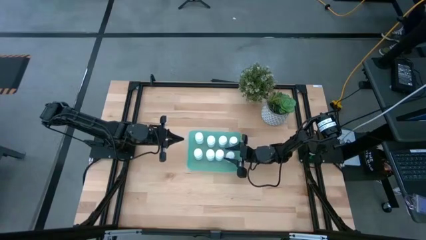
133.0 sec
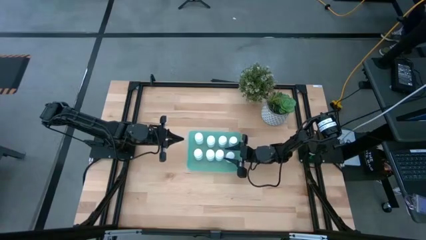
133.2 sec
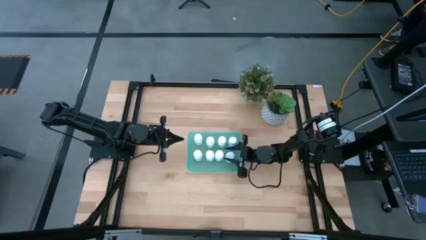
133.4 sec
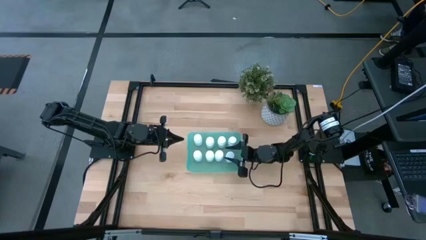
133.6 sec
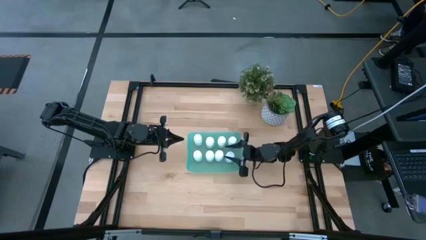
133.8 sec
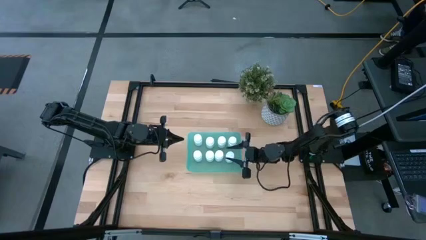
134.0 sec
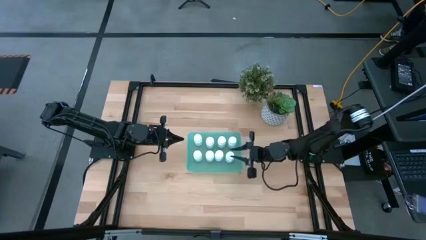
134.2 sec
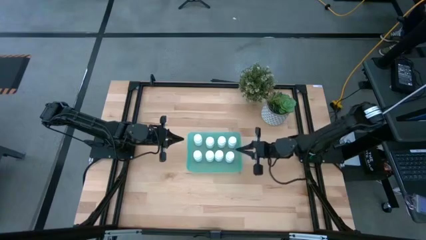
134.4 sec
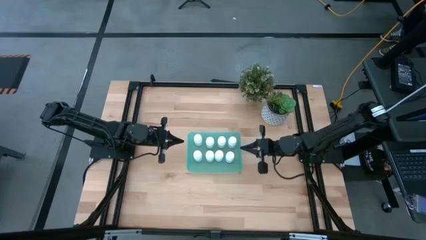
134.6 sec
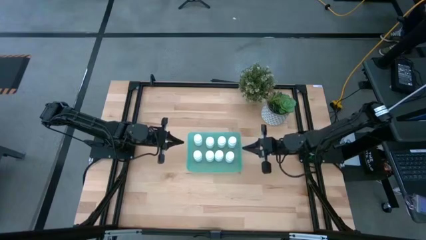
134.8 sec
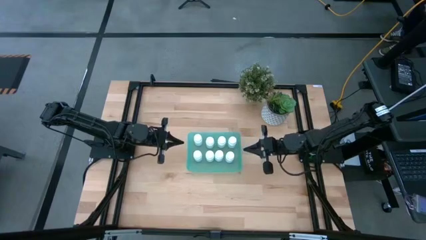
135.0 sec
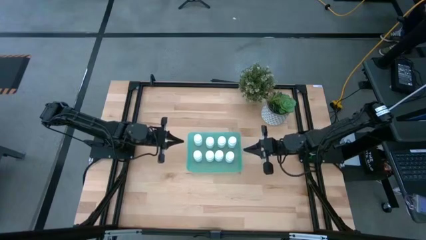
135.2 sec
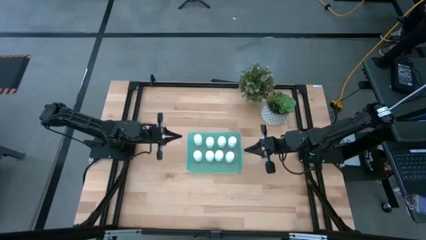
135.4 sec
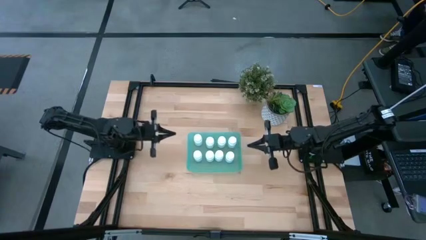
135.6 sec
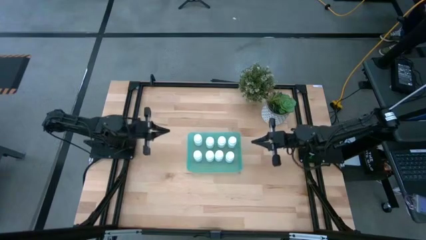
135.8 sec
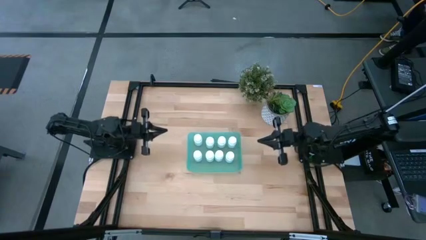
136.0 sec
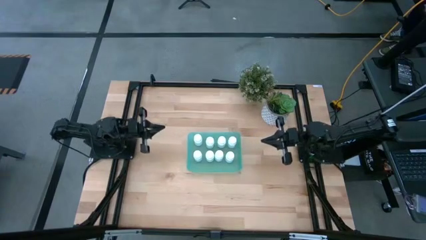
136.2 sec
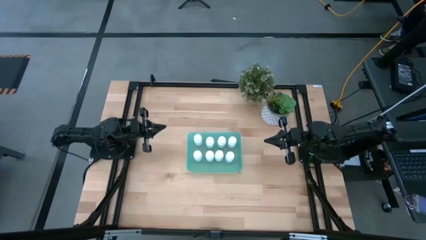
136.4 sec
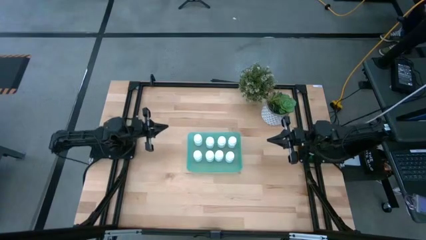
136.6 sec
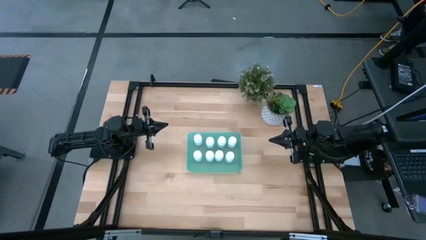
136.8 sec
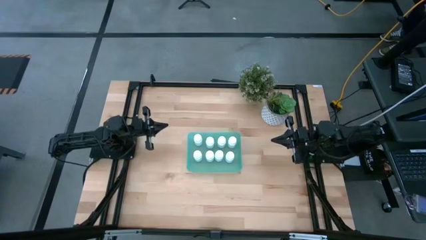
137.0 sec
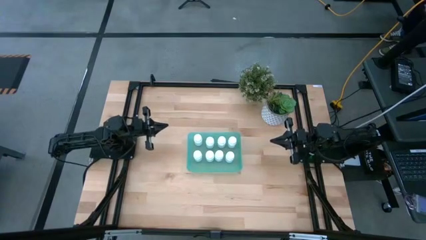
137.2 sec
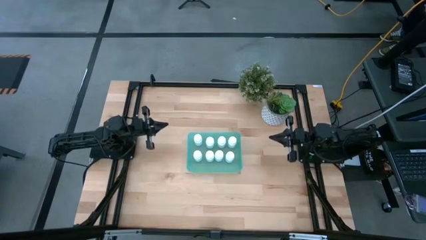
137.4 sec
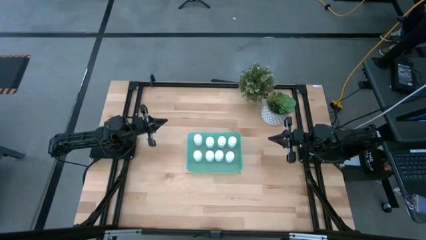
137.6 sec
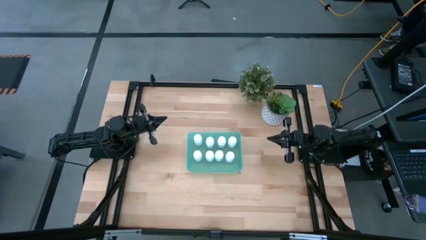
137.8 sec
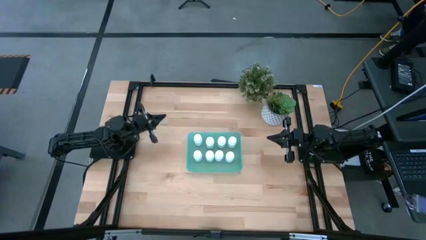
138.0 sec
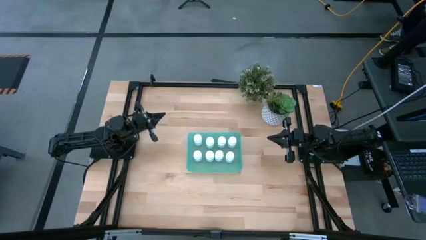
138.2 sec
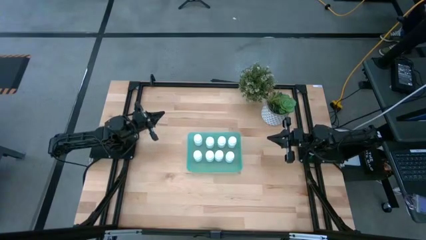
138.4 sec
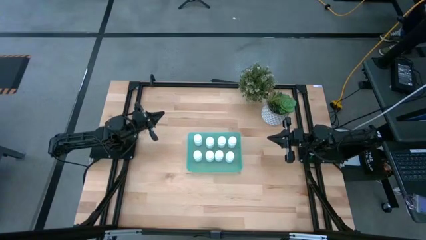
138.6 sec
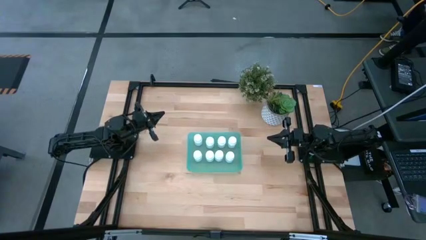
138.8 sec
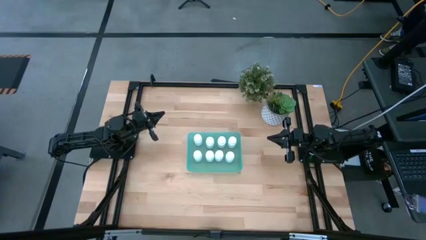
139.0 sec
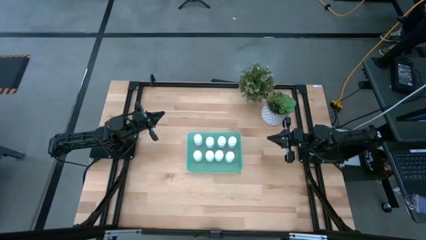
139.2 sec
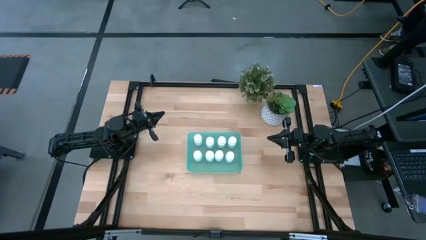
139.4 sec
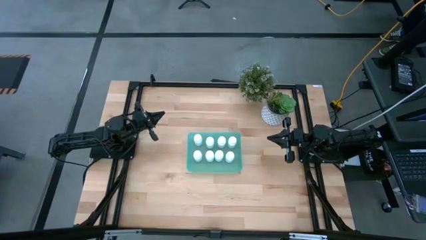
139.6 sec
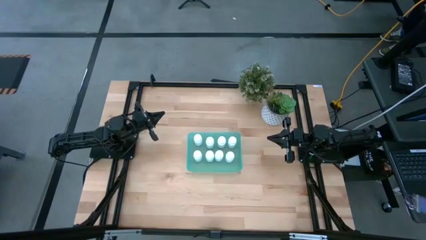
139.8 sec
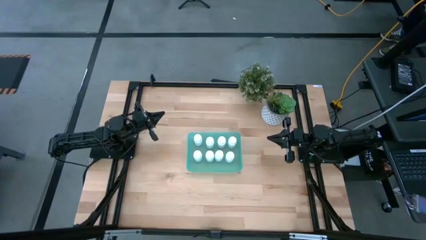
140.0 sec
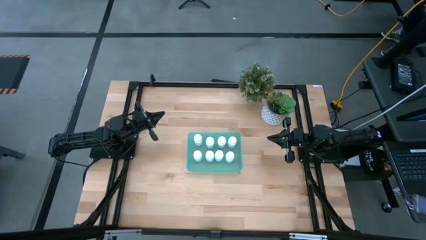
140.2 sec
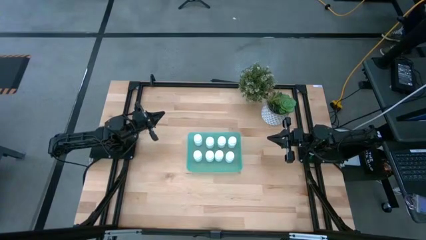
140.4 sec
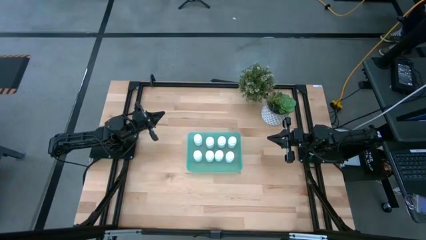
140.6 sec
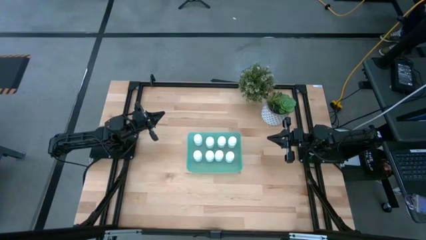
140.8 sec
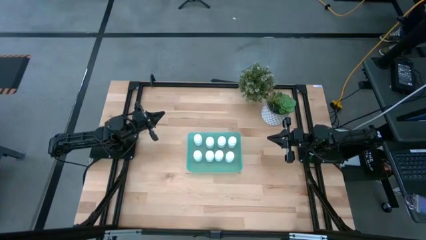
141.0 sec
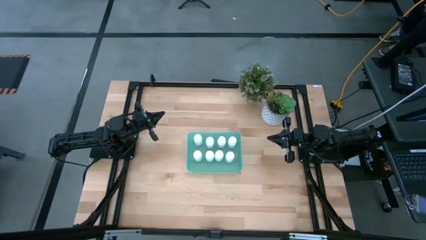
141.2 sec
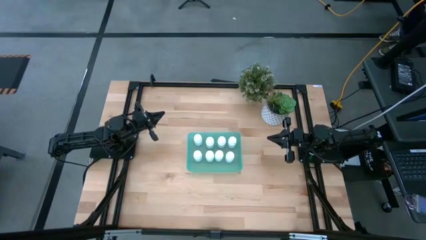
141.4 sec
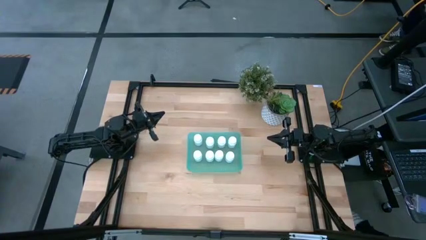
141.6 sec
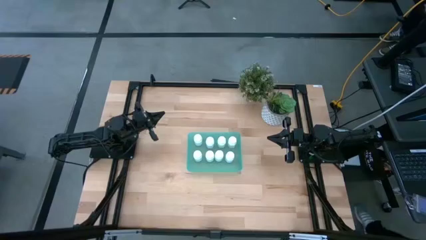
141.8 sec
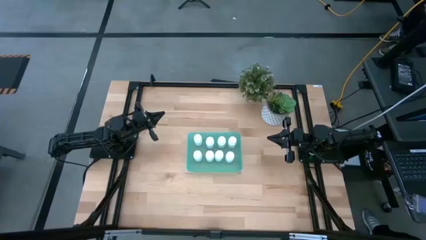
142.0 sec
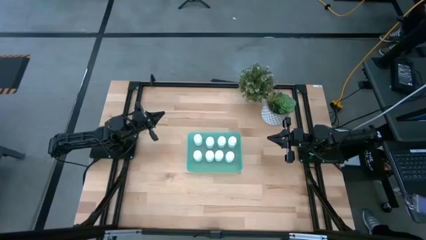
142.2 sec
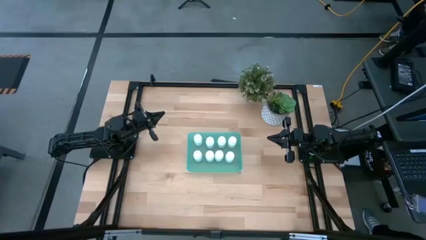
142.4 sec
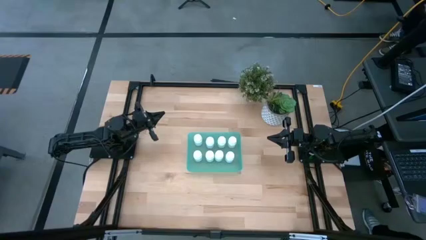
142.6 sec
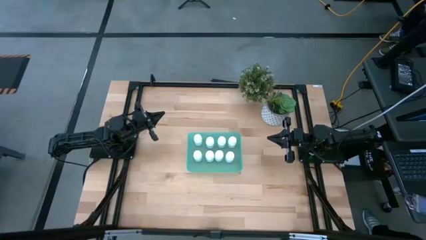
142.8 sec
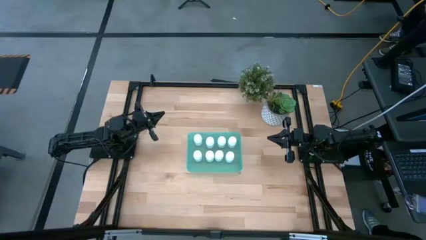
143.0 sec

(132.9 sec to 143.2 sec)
Task: Pick and place pill bottles into a basket
Return to Home Position

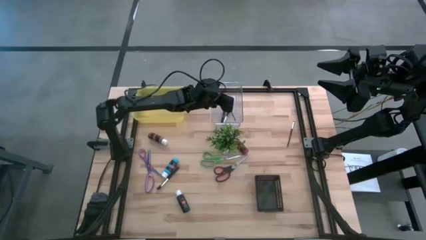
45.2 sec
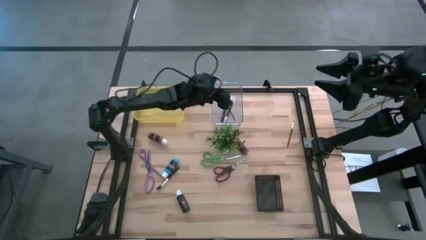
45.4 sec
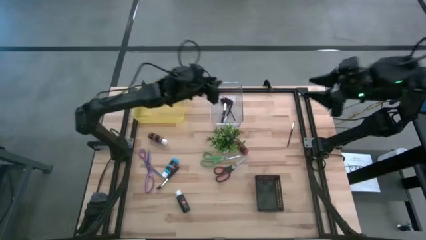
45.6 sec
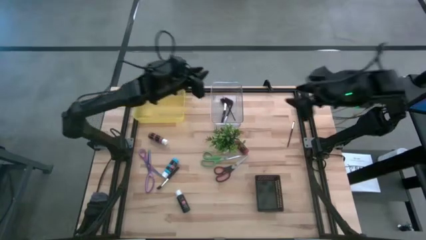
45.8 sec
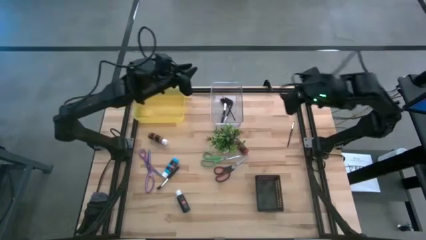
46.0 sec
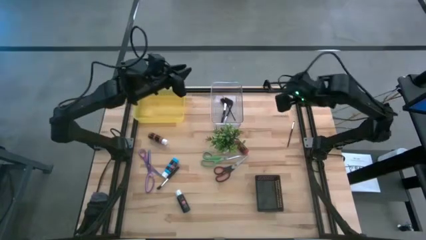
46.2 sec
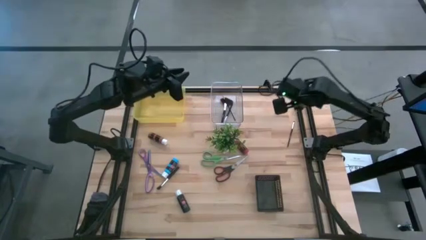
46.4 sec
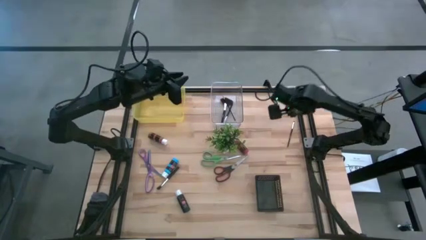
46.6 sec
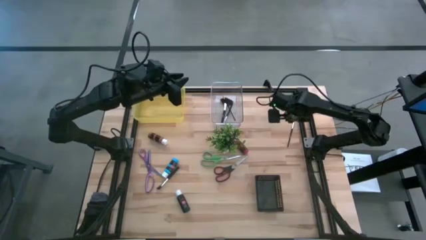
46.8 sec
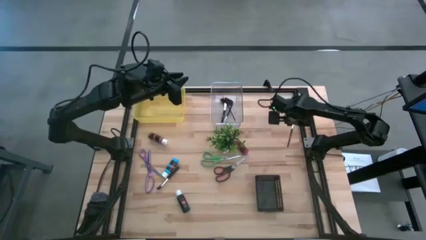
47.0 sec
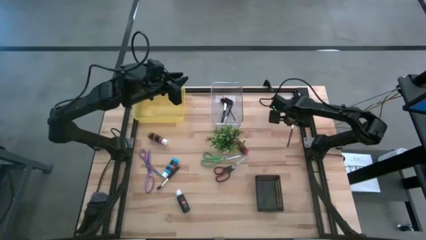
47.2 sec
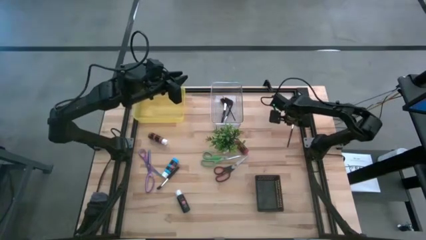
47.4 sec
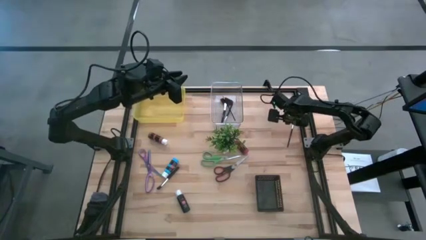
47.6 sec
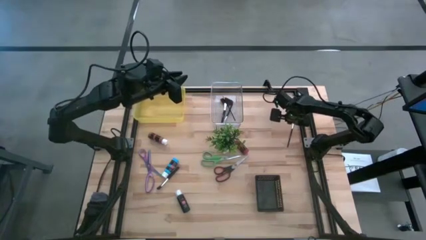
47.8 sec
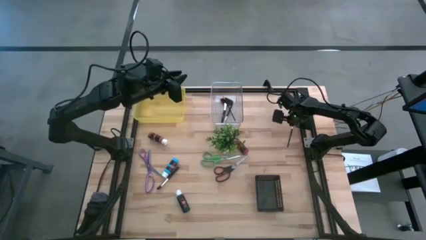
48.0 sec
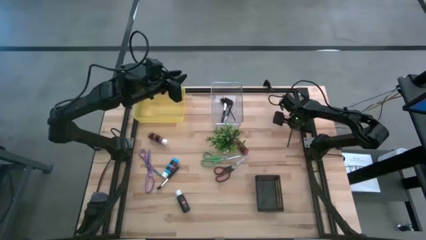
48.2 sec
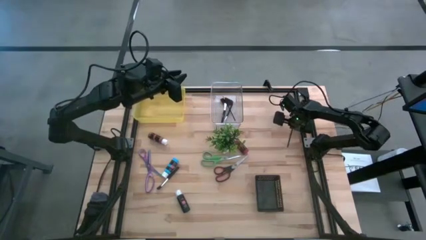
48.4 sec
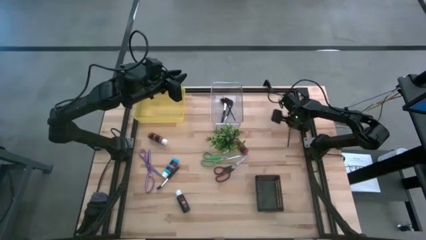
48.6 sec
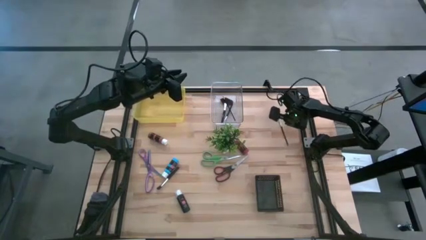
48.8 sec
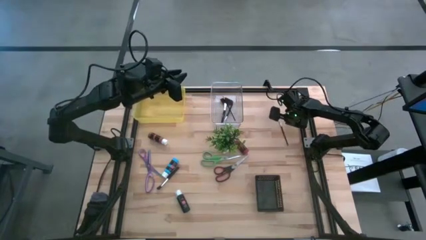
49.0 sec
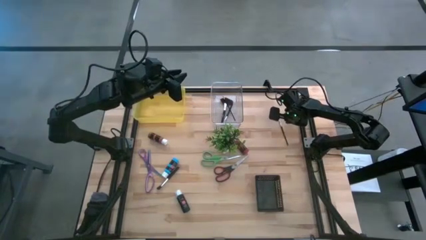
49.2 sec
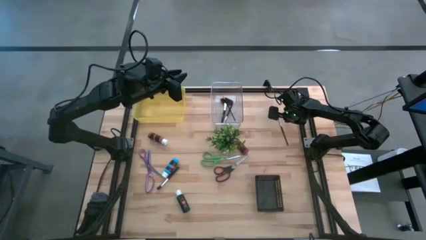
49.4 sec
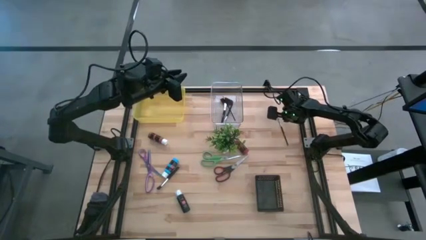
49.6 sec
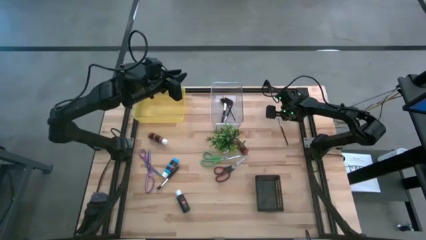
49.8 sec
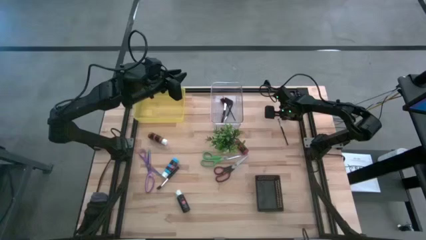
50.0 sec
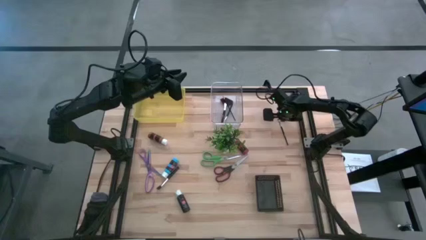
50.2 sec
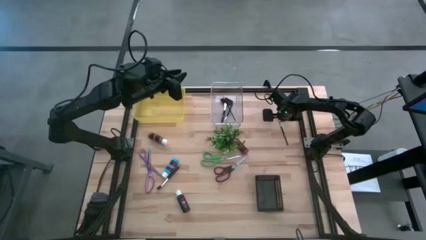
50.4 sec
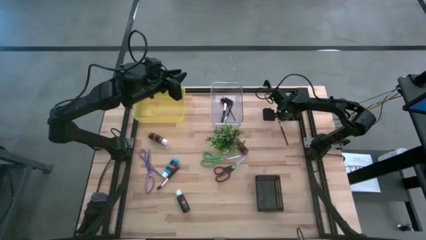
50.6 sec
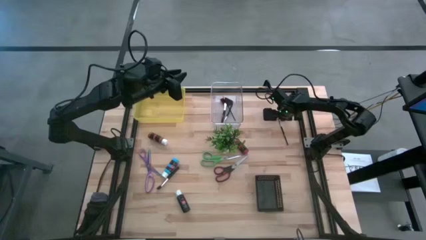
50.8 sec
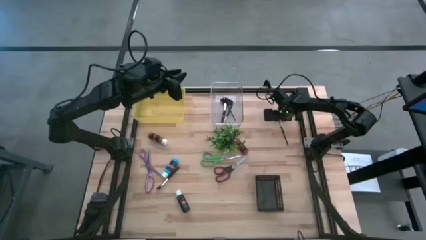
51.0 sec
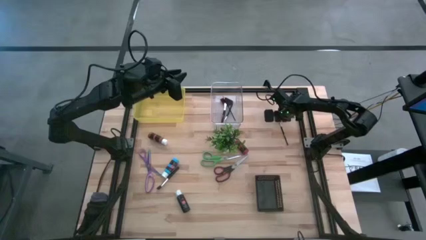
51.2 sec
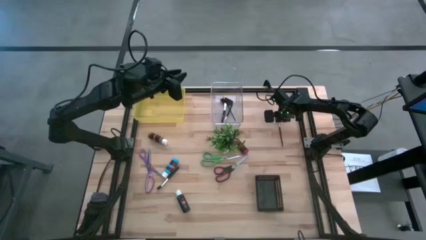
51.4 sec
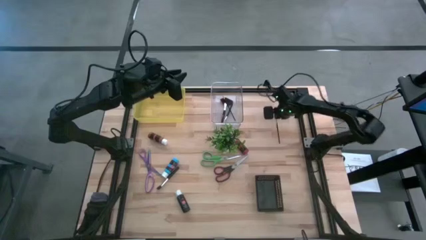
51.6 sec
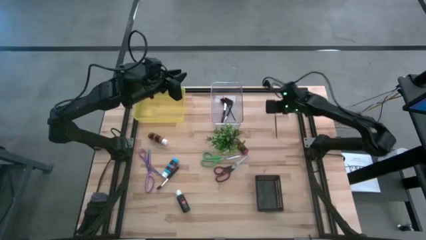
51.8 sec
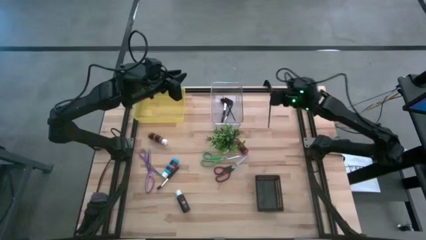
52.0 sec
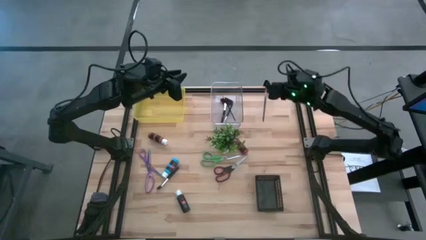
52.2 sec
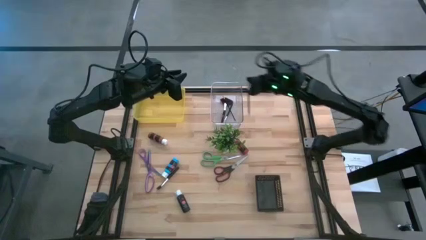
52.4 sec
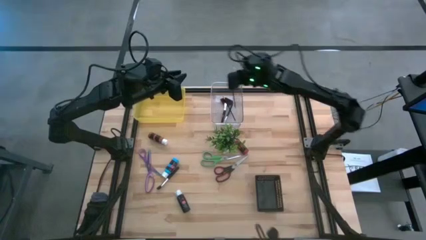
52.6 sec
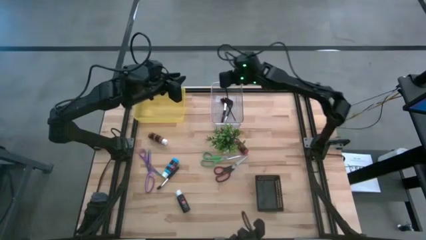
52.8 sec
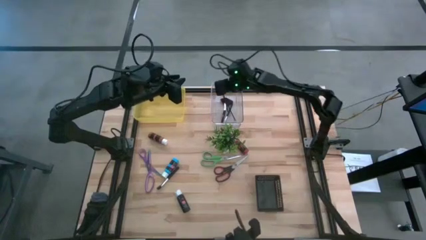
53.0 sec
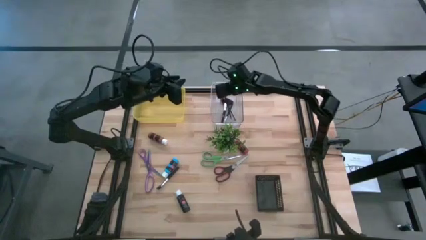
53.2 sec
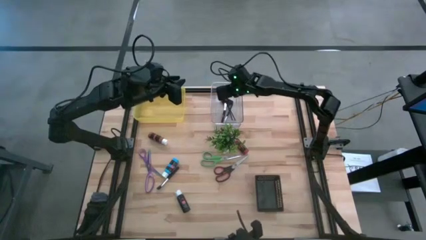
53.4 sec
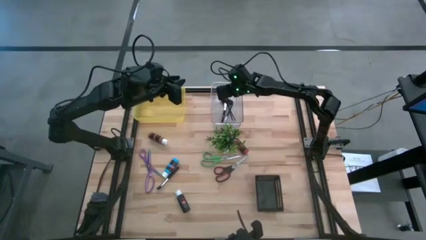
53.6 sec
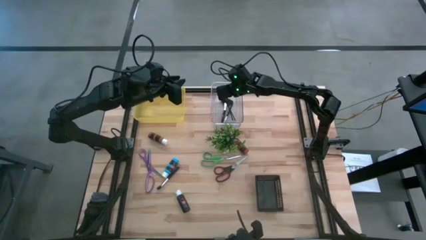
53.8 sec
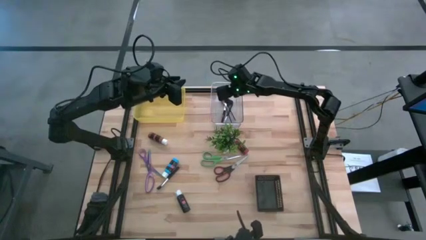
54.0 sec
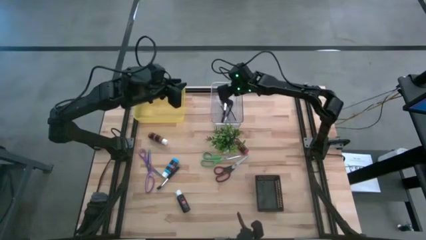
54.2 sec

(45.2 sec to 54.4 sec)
Task: Pick & Place Paint Supplies
Put the right eyeshadow brush into the transparent bin
